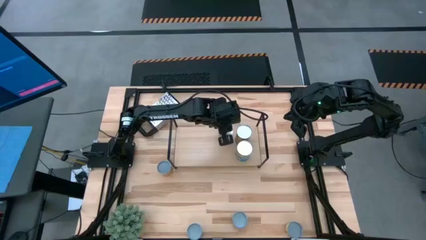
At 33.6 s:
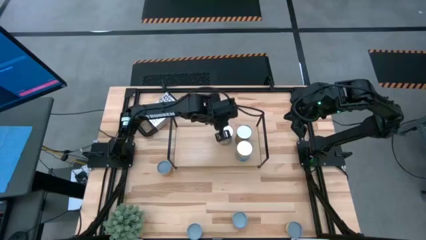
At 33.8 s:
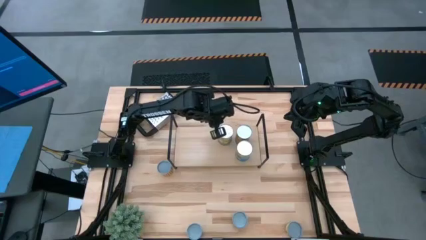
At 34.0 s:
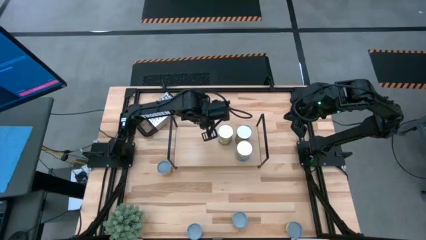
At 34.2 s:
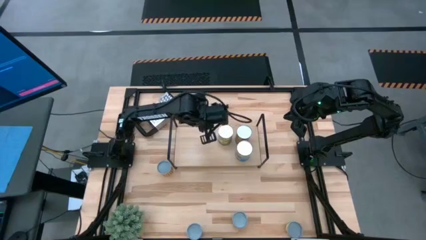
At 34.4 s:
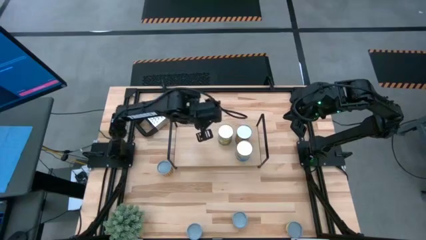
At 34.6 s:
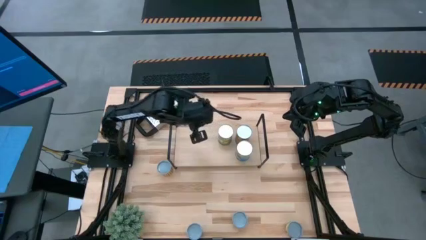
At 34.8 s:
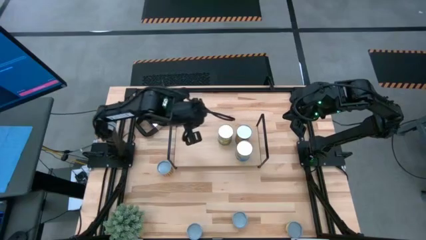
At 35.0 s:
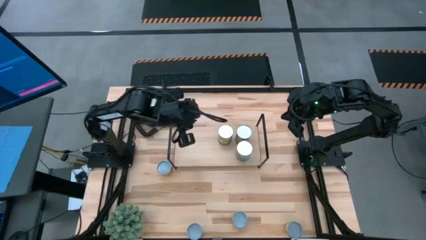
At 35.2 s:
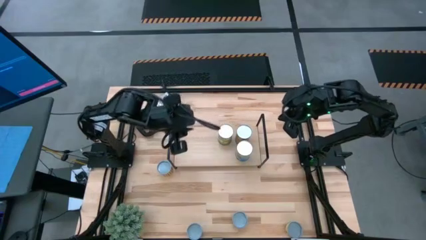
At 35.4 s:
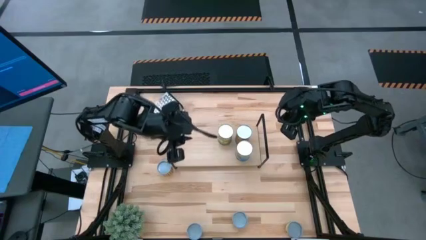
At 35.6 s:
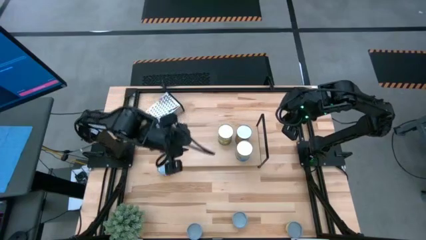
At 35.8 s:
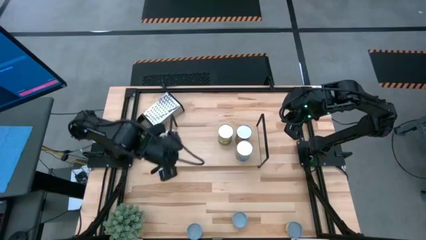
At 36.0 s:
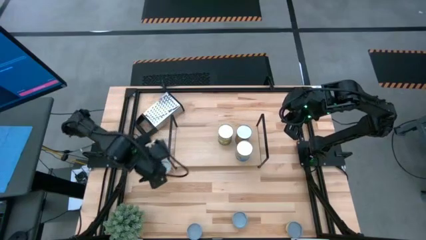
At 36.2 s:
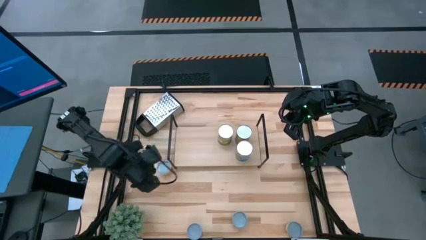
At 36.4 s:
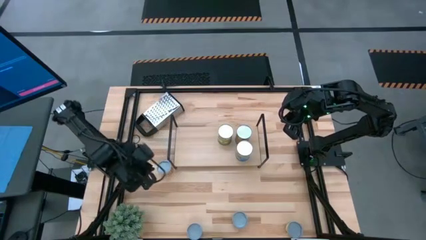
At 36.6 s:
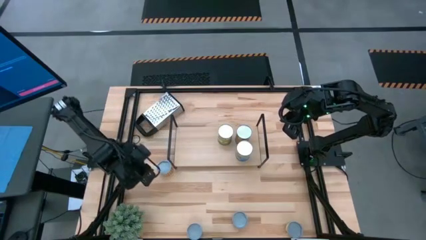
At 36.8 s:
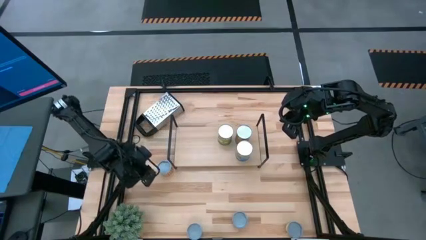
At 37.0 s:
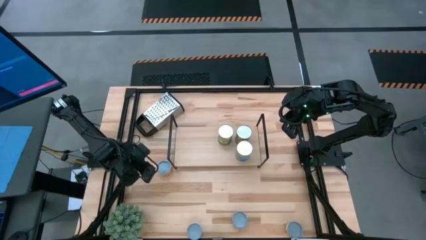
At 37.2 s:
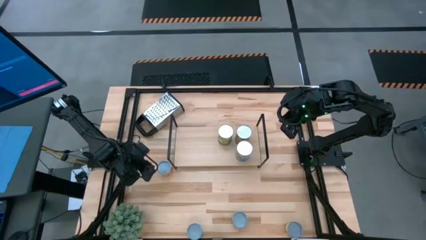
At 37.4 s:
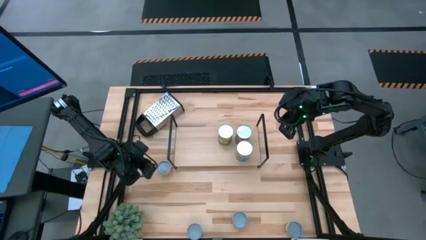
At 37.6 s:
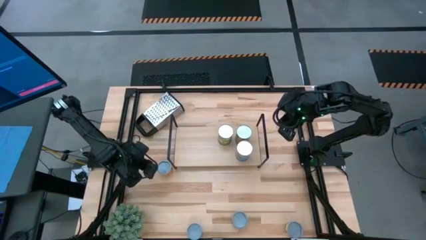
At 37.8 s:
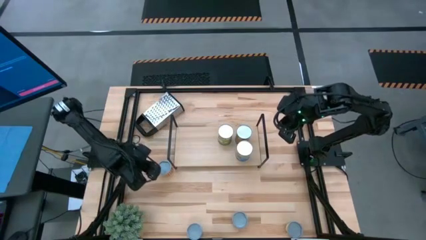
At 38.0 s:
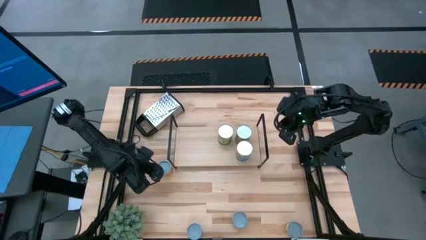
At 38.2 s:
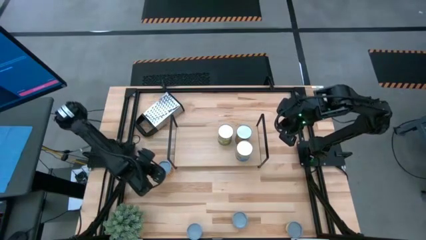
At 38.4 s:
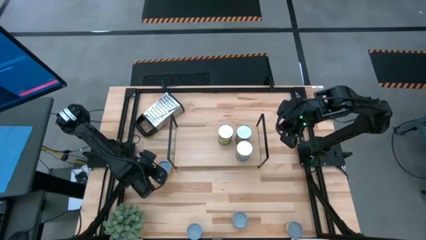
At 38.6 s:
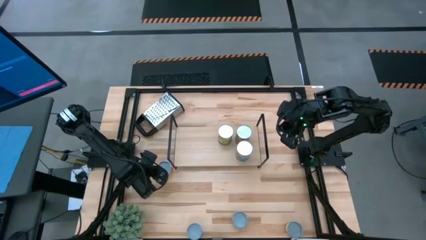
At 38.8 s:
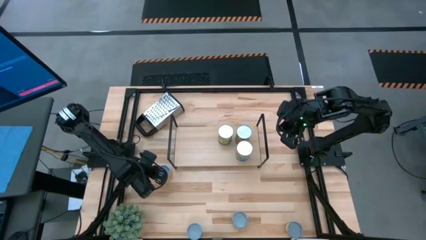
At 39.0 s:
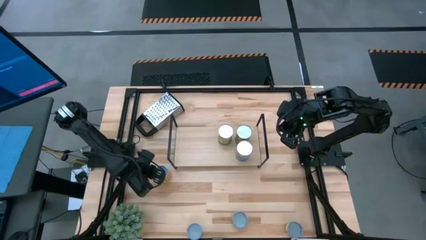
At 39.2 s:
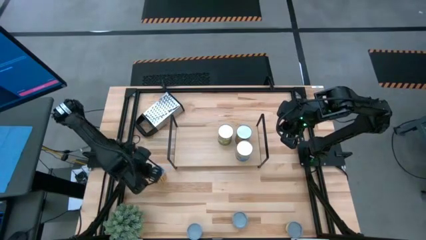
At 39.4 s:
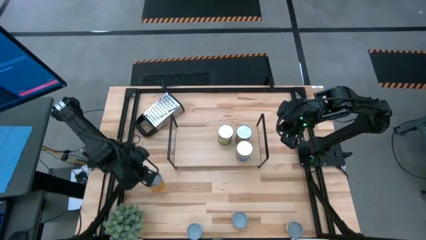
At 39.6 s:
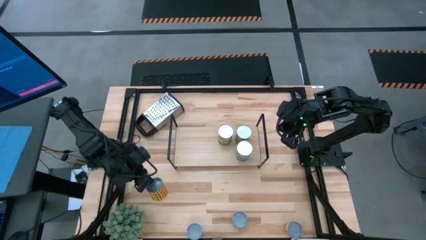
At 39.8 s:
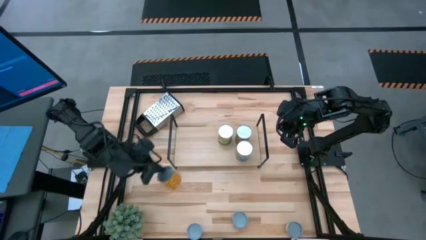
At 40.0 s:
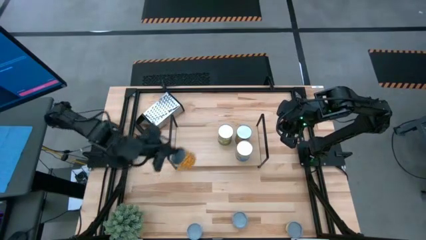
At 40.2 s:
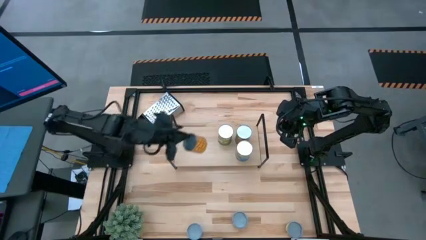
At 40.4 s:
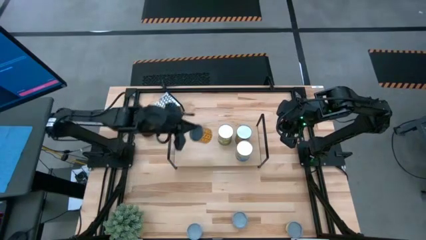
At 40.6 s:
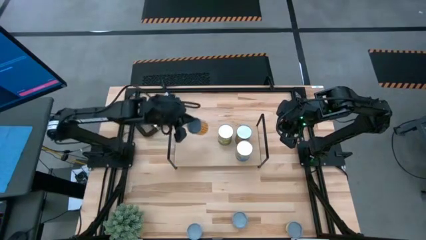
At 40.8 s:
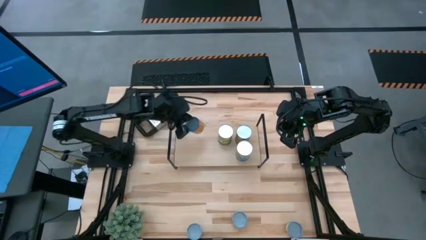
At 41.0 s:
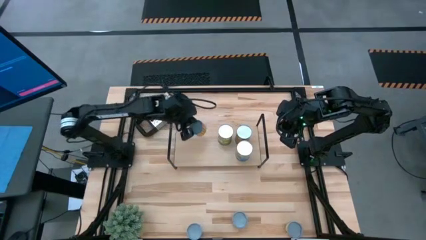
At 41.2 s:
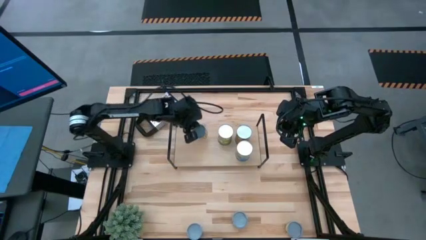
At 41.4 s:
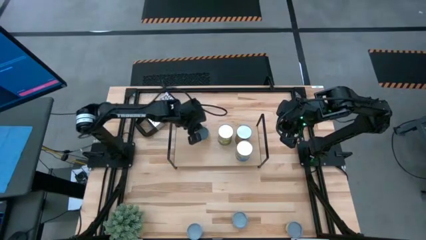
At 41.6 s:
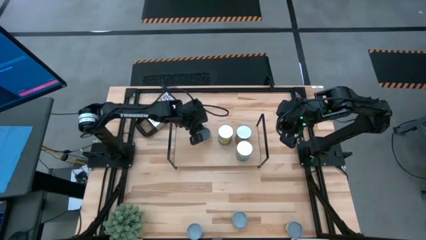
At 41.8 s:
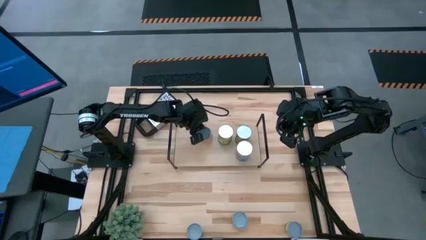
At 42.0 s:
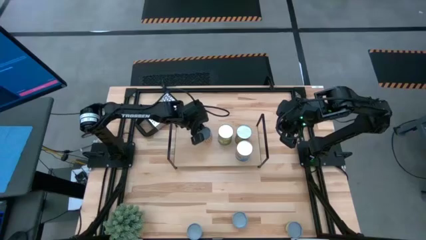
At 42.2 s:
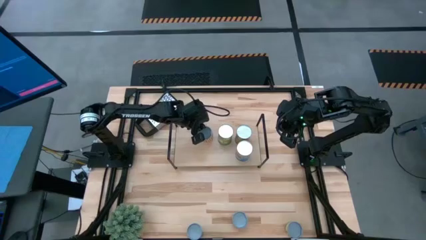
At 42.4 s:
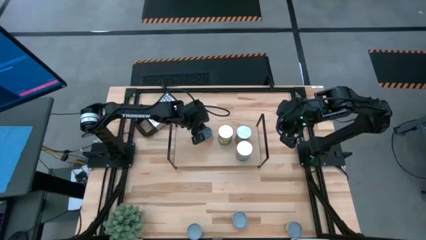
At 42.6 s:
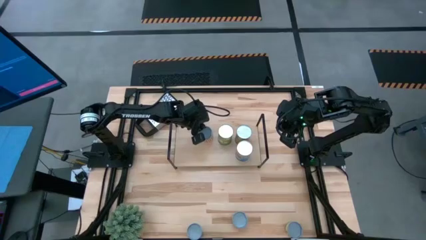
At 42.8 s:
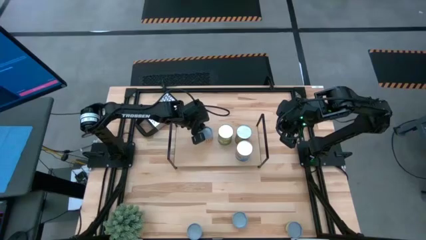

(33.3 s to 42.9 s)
Task: Pick and place cans onto a shelf
Put the yellow patterned canned food on the shelf

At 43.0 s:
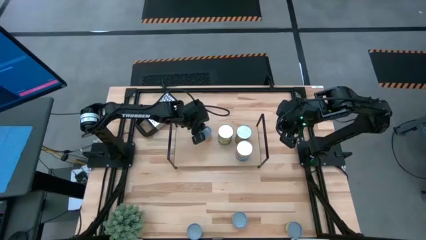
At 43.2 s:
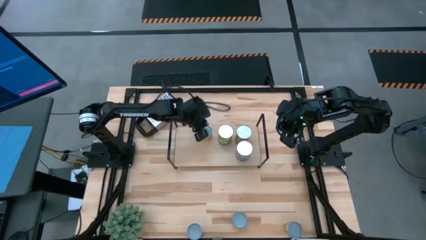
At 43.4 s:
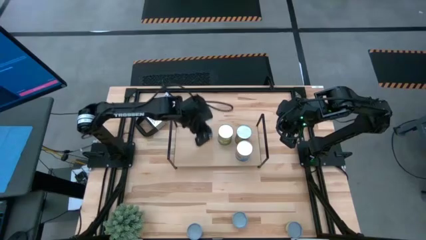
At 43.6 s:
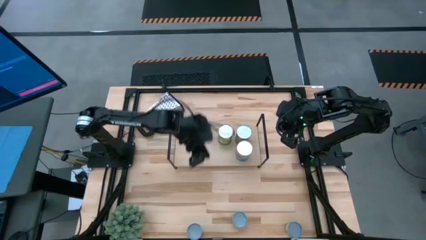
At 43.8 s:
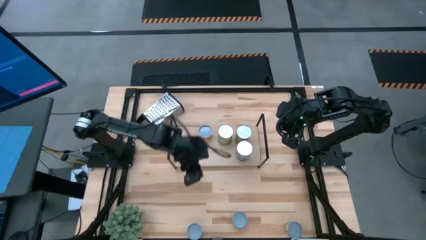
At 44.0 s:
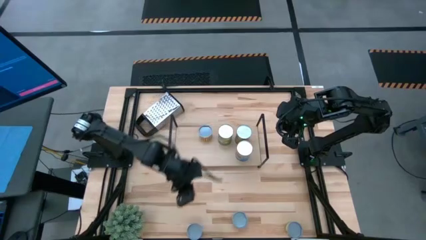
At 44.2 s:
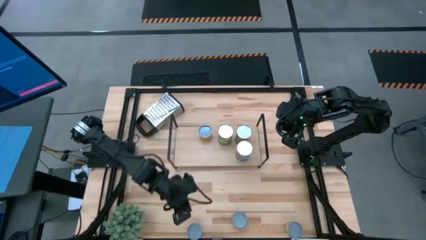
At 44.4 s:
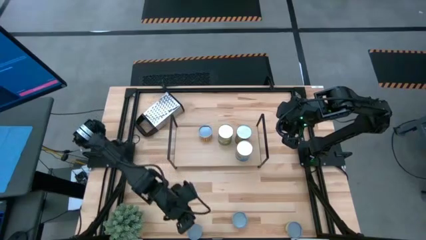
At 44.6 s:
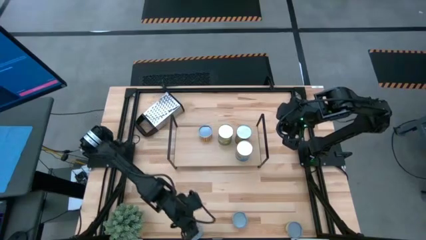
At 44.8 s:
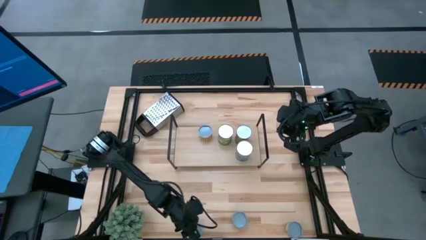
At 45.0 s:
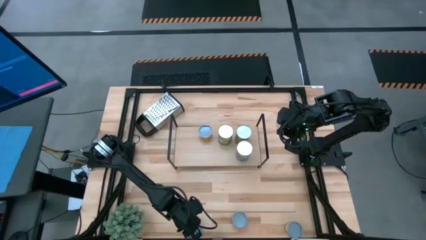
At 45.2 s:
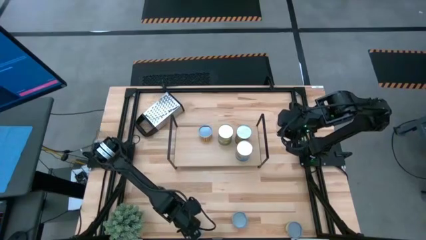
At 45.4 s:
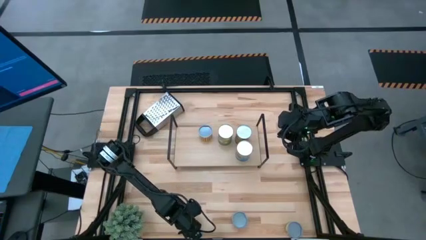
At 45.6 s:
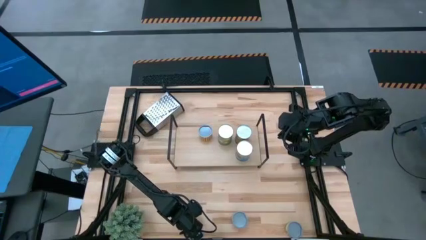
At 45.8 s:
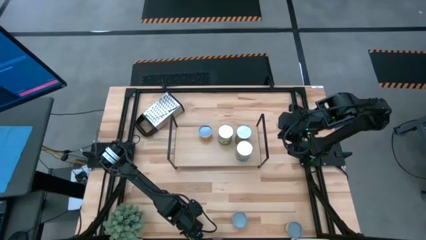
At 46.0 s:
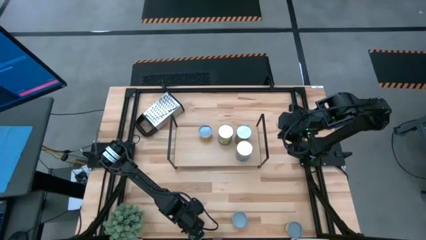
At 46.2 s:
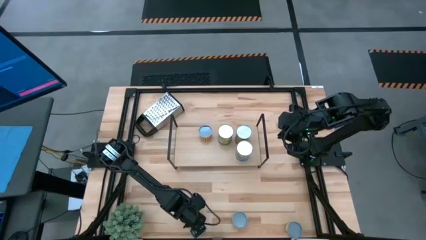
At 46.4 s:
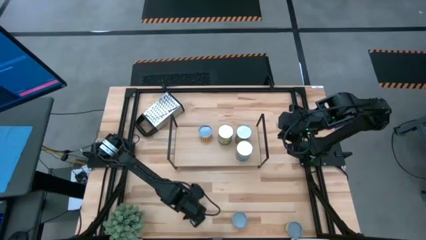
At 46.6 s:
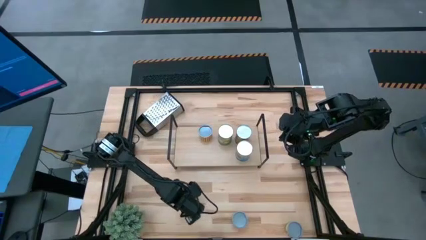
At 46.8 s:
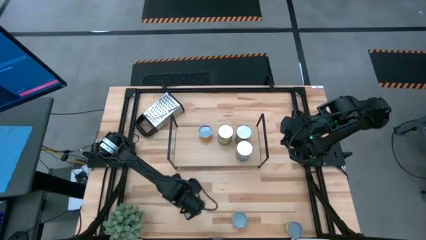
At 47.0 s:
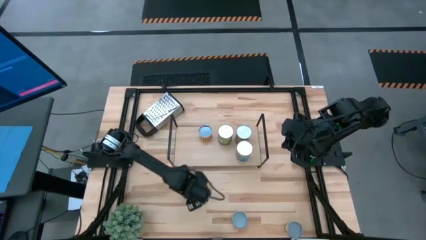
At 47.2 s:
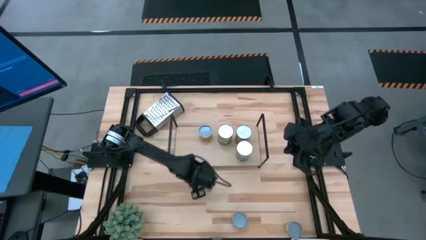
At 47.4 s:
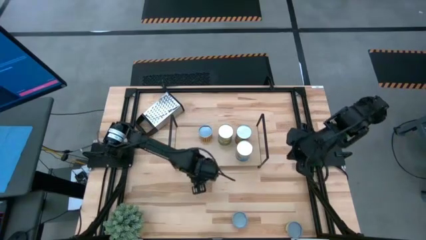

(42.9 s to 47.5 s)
Move the canned salmon to the center of the table

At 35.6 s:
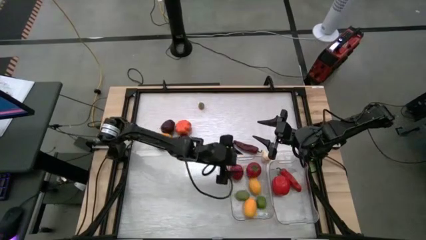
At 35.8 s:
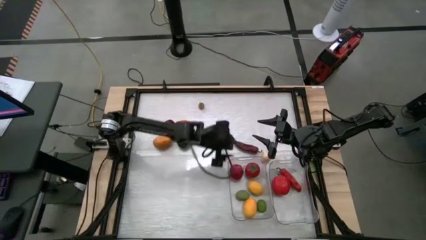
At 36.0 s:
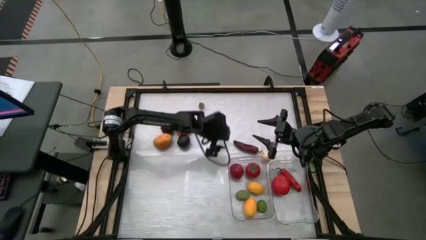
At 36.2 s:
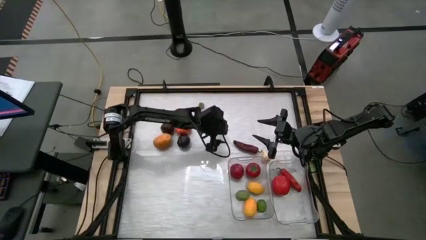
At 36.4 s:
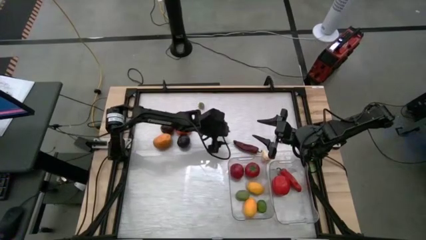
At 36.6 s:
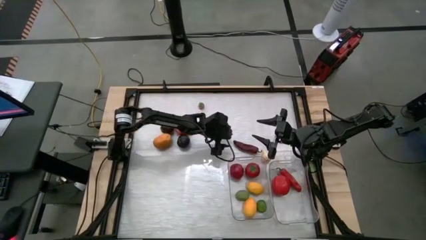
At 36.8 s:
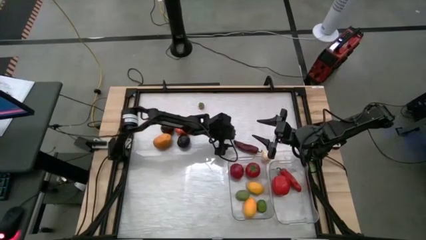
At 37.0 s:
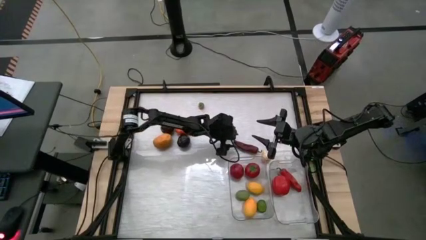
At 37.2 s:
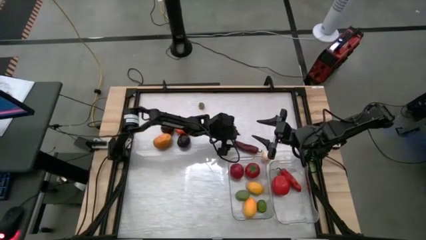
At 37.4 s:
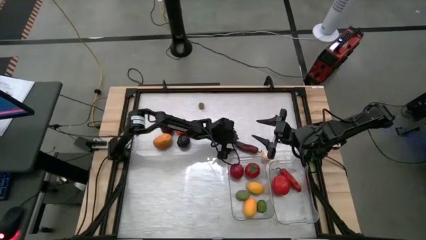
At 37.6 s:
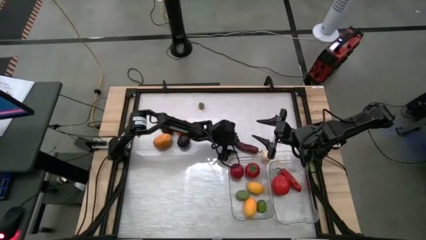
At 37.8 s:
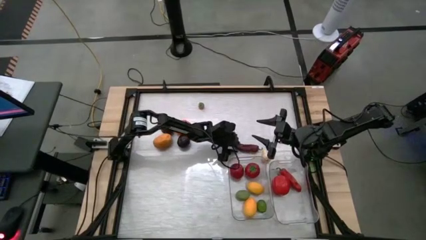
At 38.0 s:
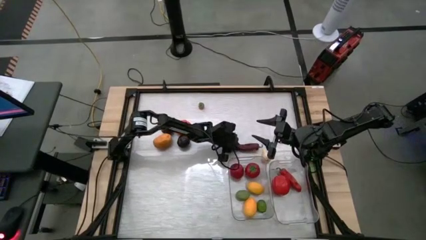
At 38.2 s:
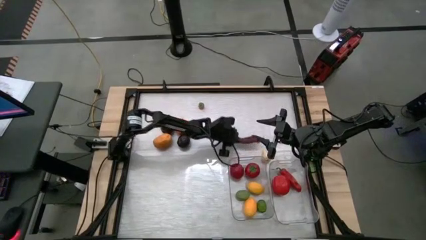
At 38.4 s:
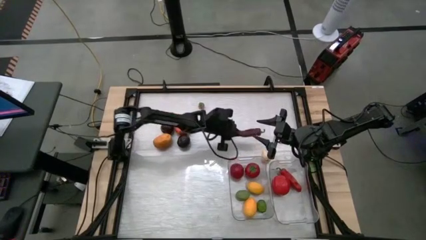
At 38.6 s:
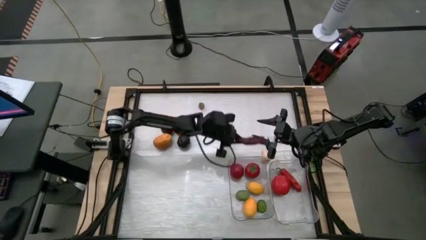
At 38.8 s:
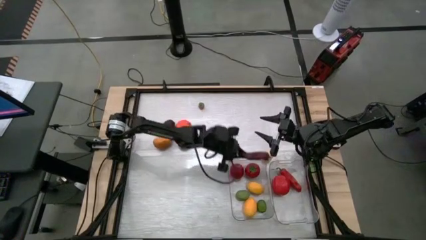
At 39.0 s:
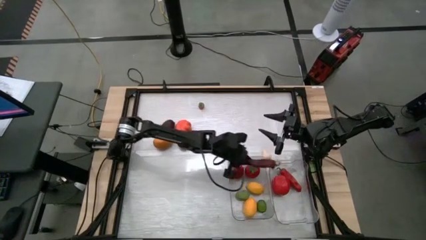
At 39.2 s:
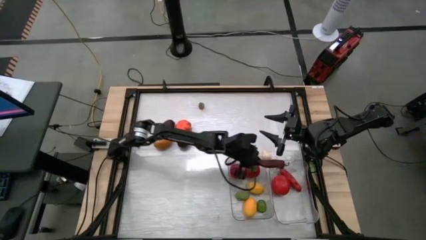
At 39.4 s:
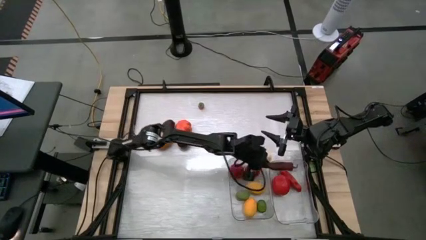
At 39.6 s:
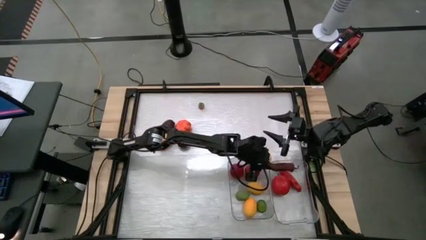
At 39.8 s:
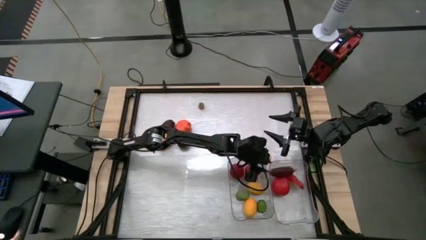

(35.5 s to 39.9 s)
Task: Sort produce into baskets
Put the dark red chili pepper into the right transparent bin
